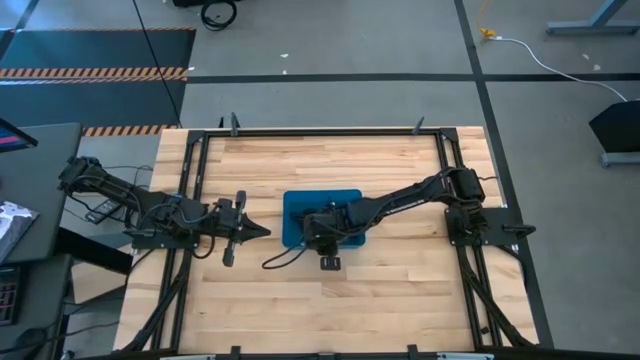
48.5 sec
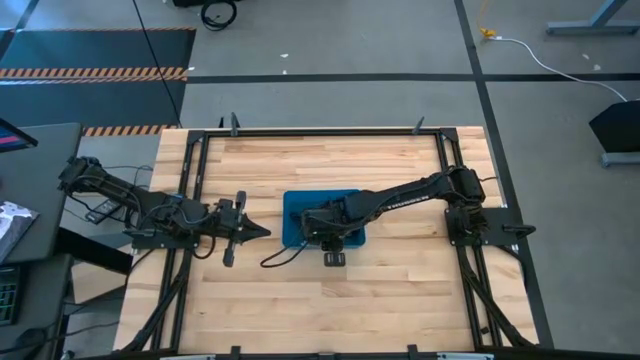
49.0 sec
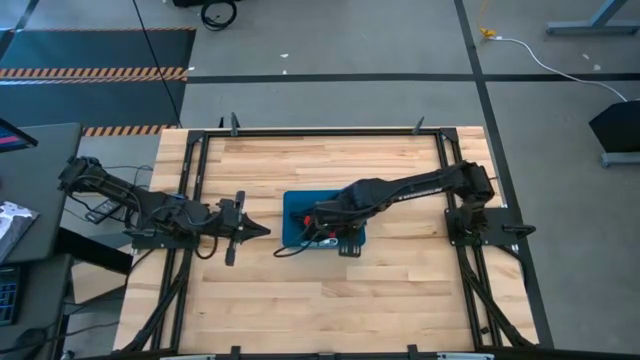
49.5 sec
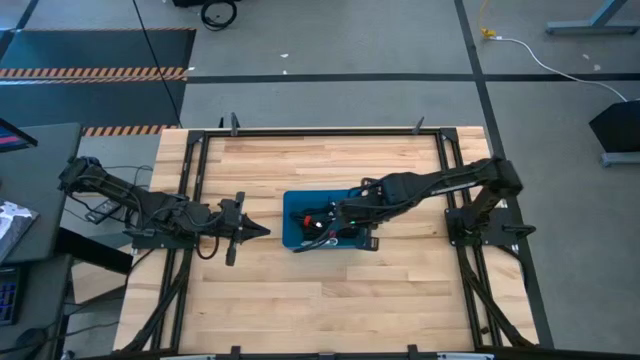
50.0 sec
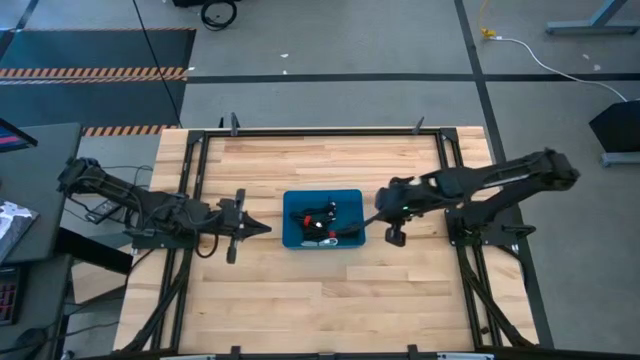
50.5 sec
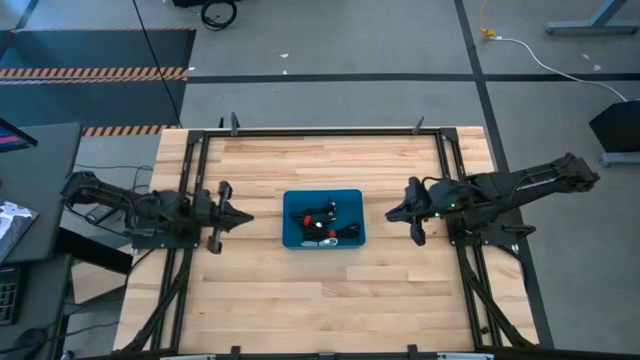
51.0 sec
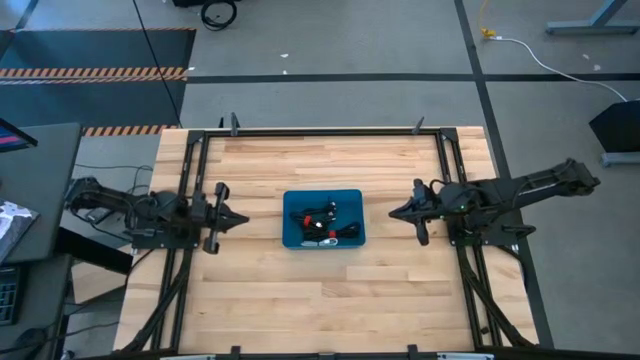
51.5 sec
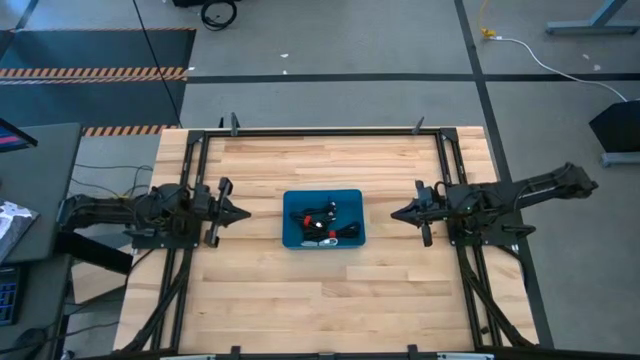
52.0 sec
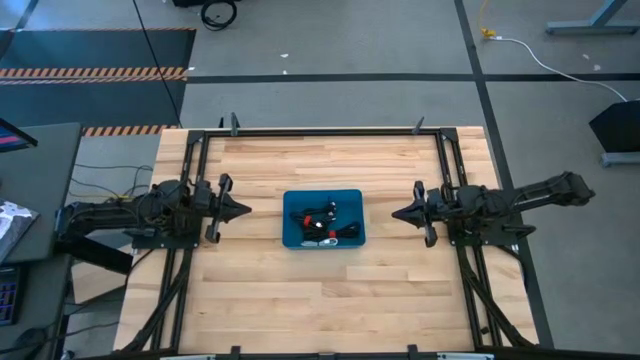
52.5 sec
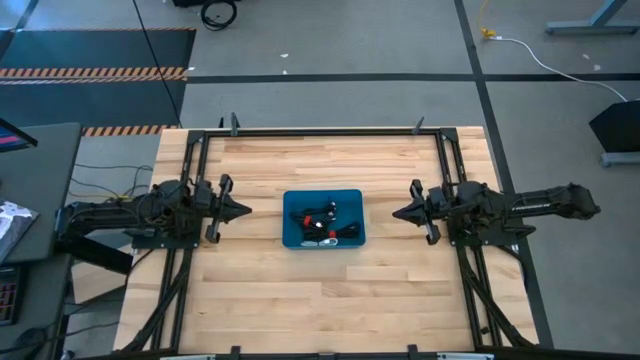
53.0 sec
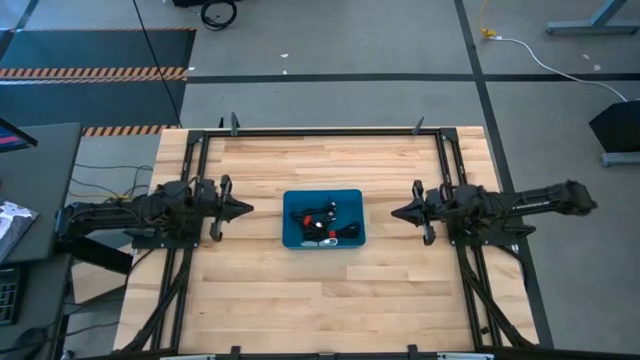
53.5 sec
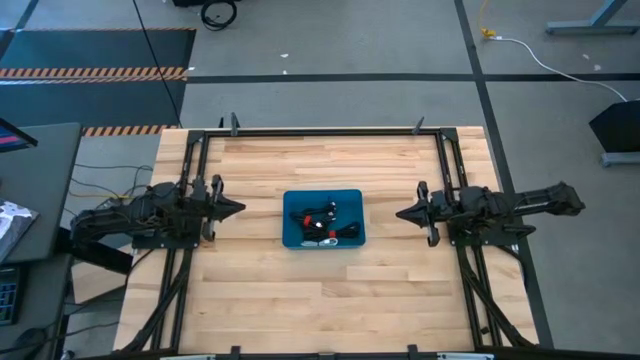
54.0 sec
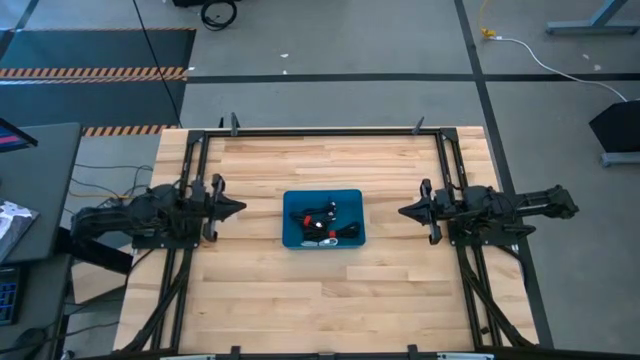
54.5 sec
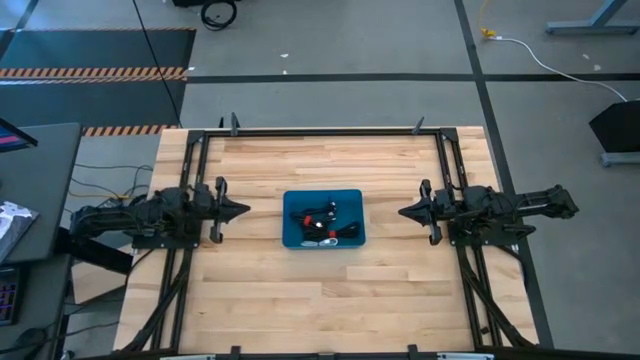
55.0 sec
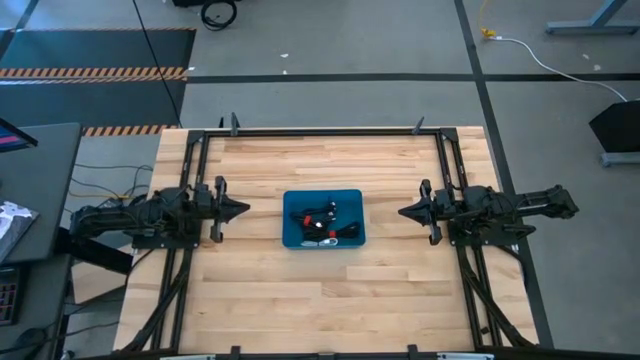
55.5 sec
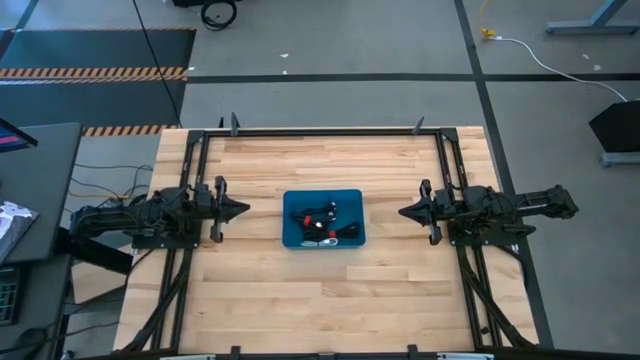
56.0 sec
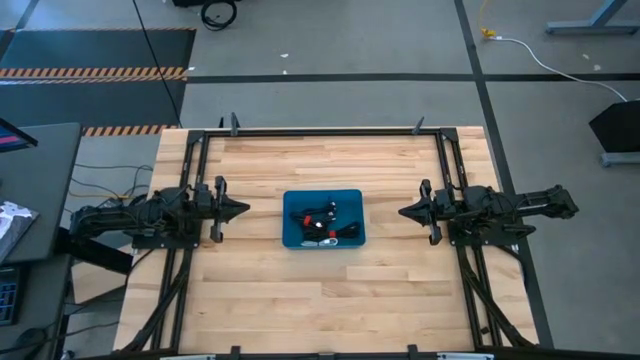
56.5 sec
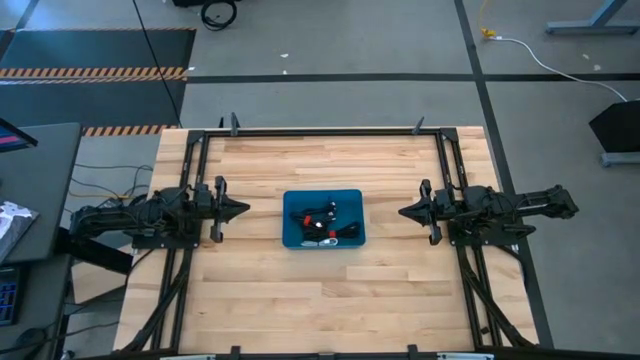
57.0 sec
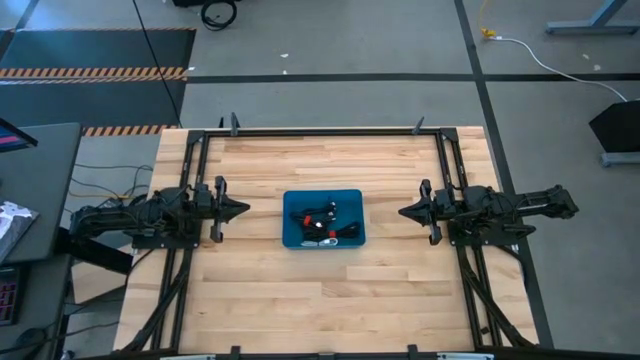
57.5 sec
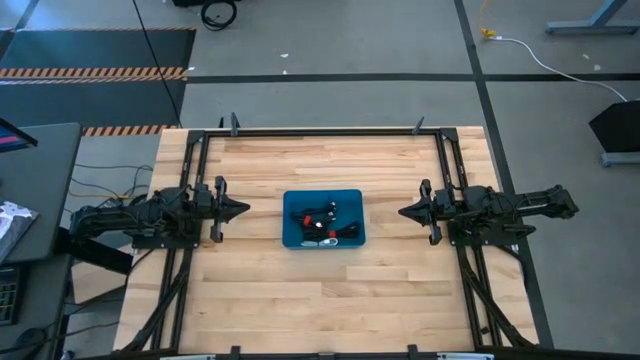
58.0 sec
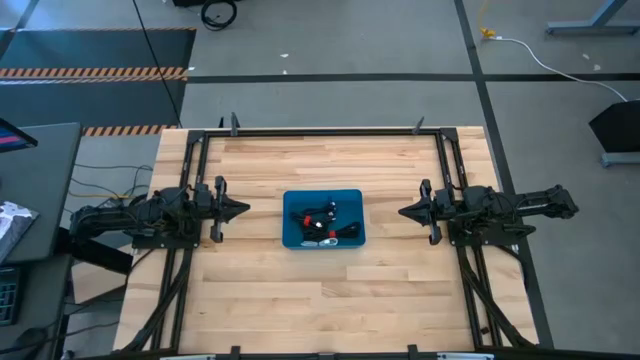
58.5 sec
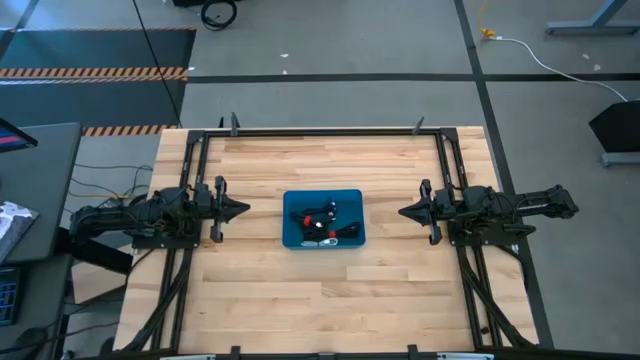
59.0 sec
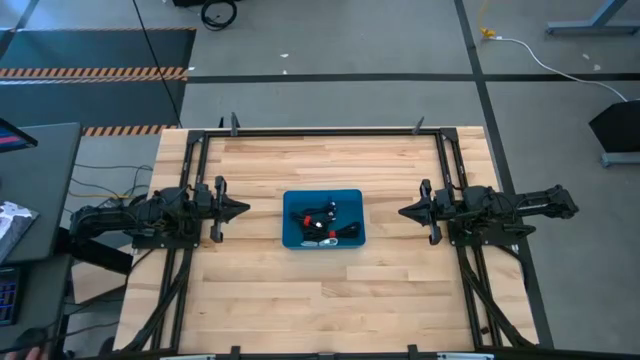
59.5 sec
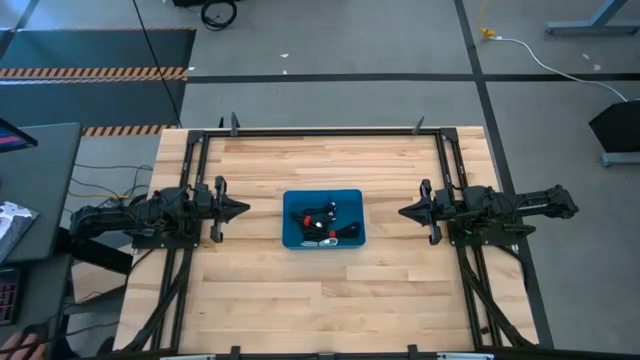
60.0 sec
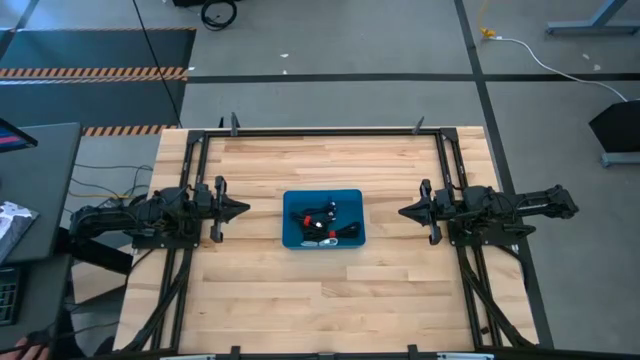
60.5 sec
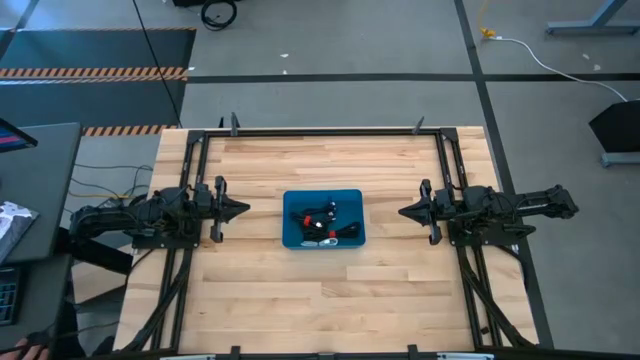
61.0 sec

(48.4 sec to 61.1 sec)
Task: Pick and place USB-C Cables
Return to Home Position

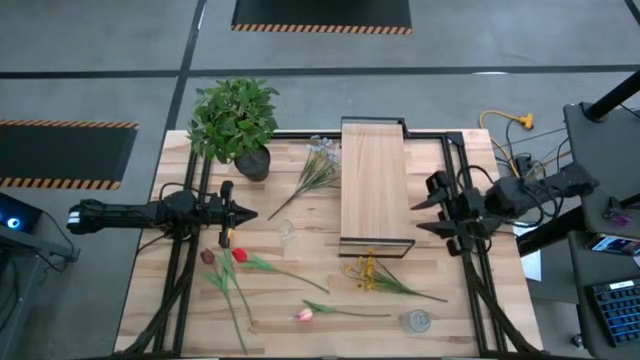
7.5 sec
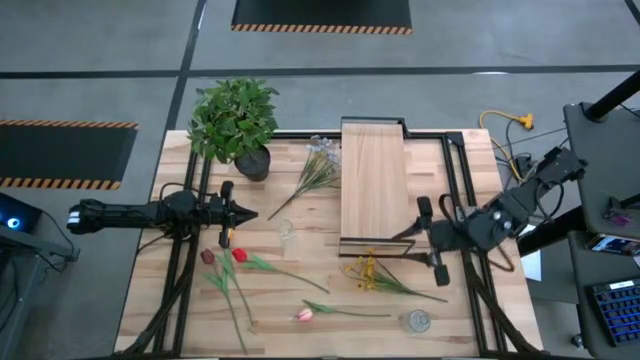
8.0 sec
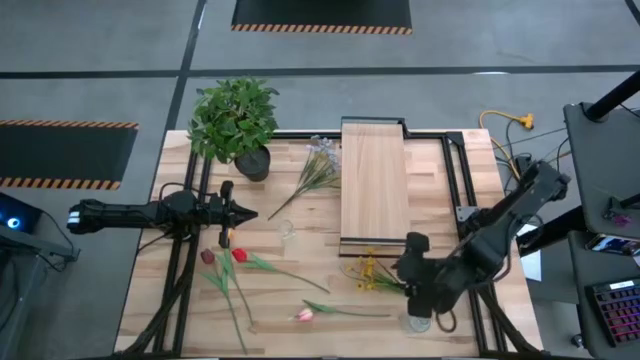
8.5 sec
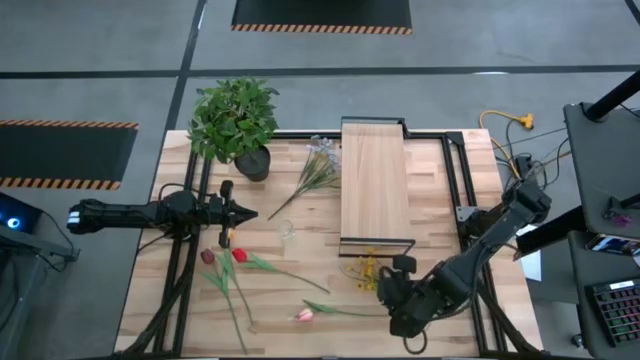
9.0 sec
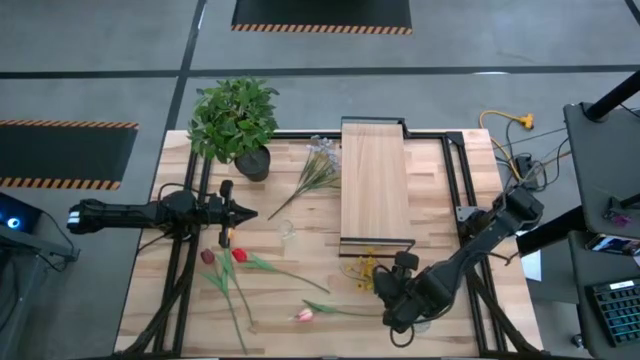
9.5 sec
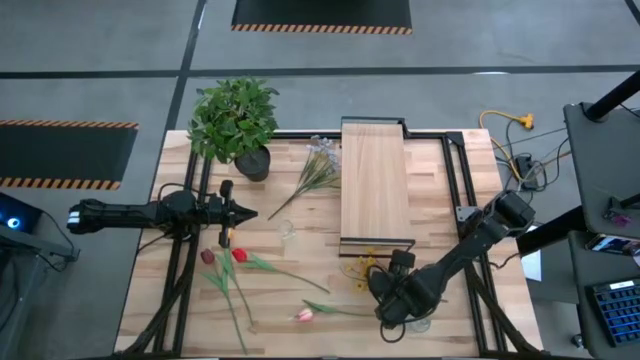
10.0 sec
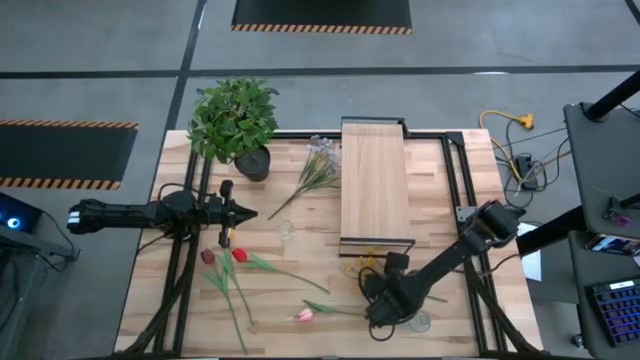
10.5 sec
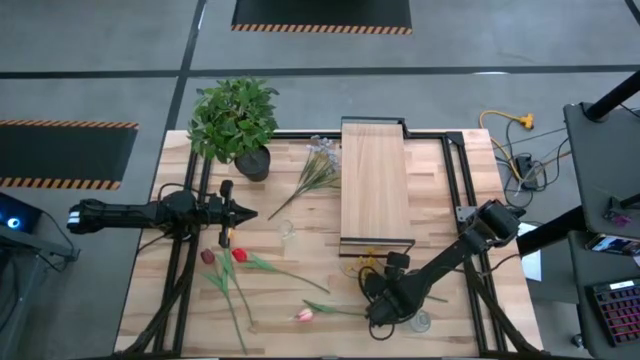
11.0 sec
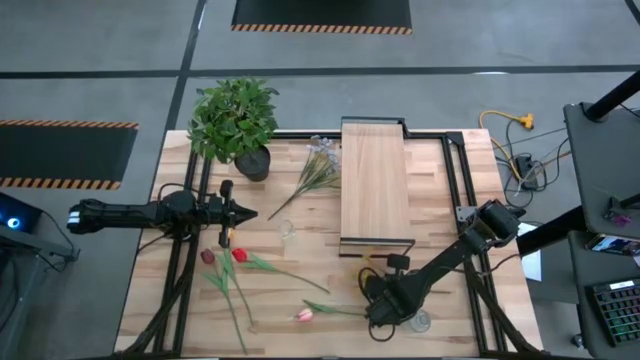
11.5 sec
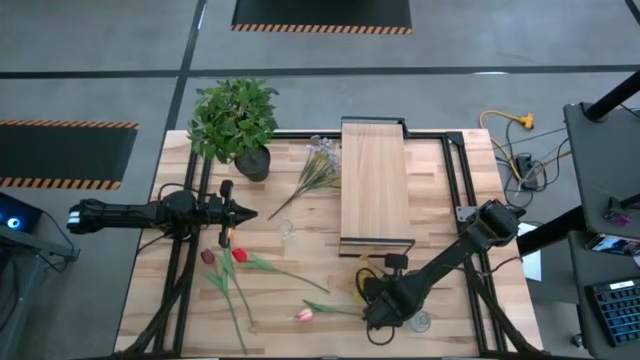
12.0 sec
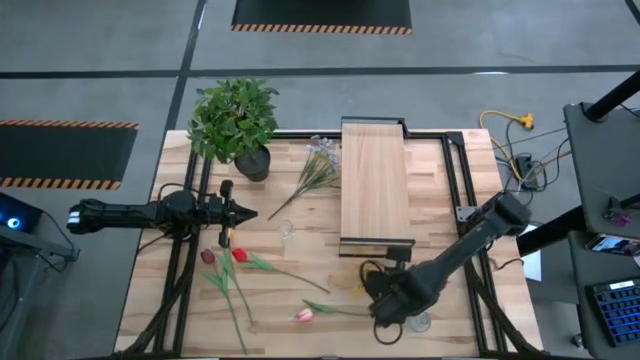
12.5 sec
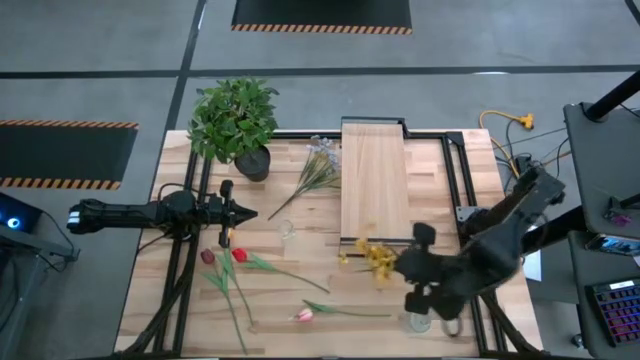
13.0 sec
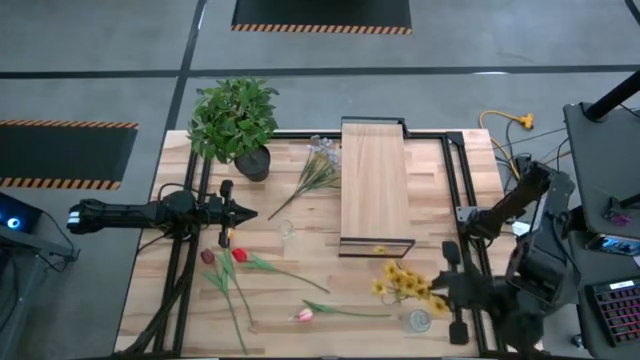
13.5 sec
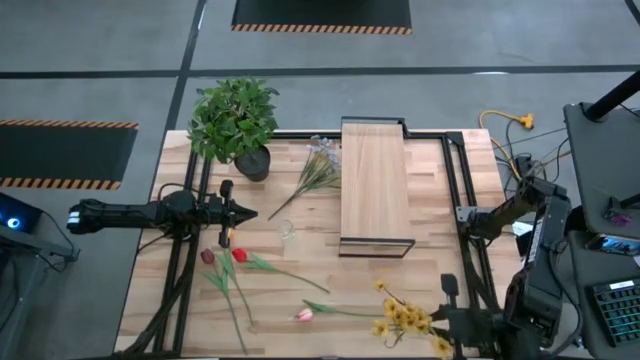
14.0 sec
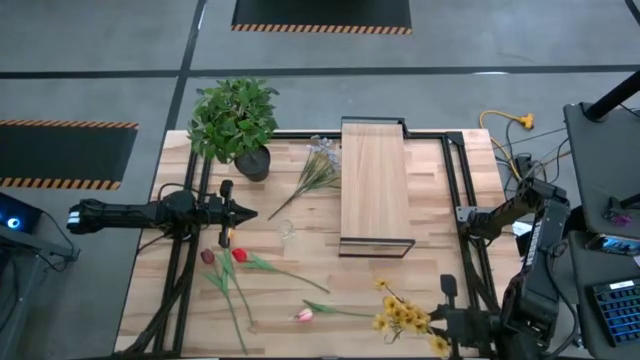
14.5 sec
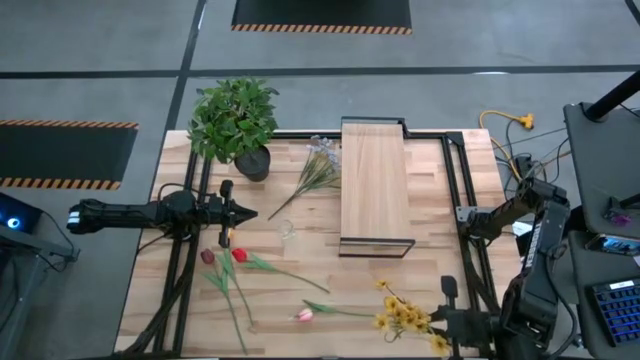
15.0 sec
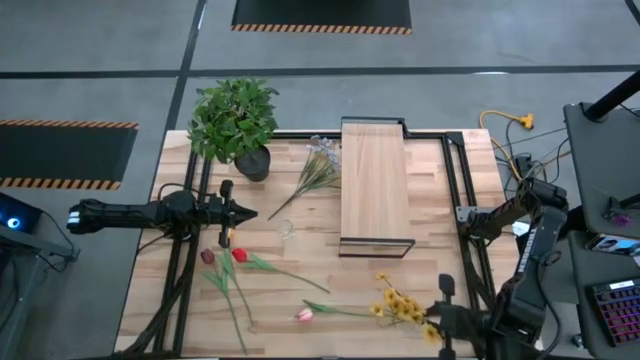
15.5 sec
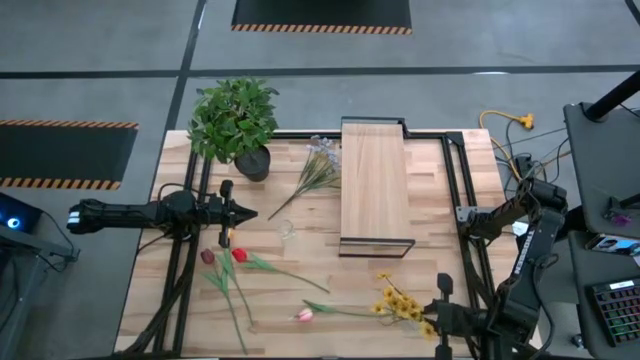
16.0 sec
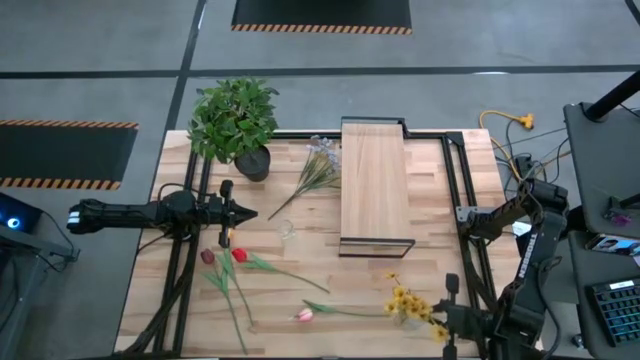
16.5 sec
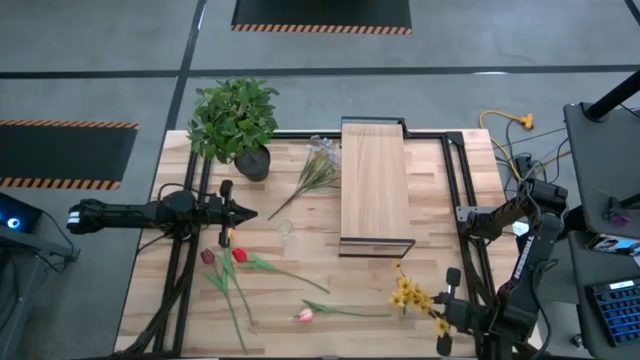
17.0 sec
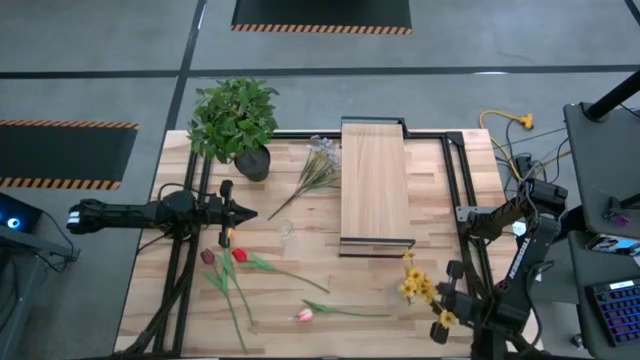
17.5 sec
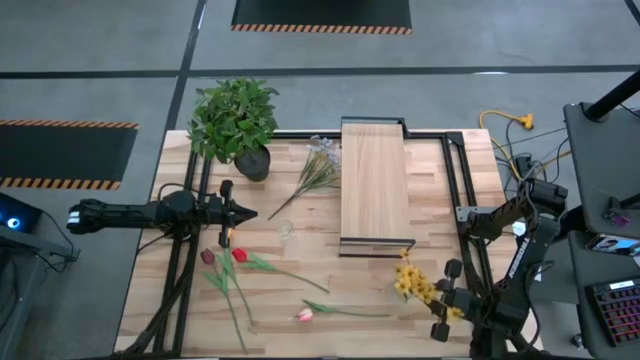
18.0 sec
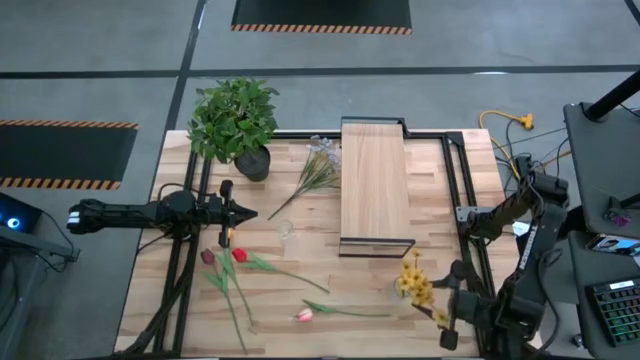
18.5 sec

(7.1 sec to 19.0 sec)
Task: Pick and place flowers into a vace then onto a shelf
Put the yellow flower into the right transparent vase
